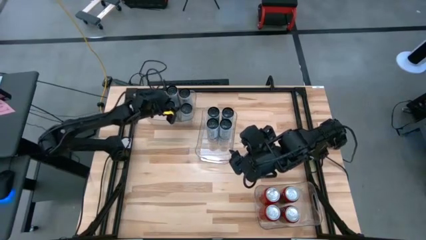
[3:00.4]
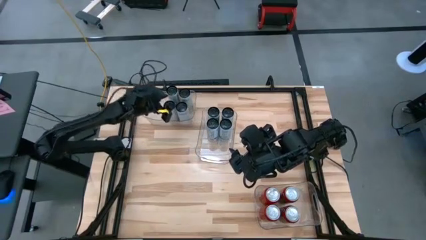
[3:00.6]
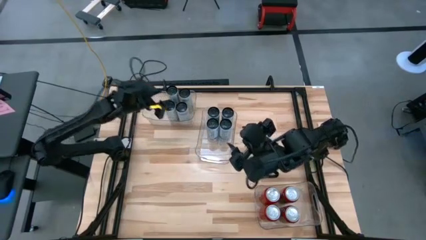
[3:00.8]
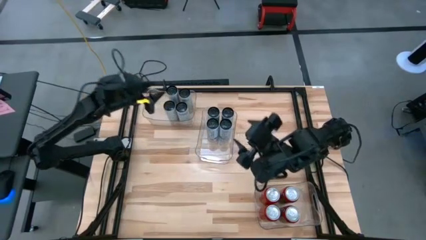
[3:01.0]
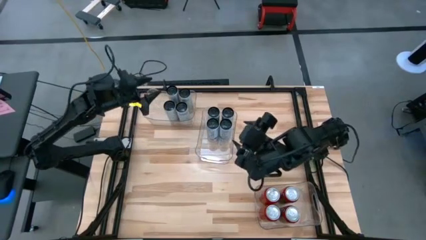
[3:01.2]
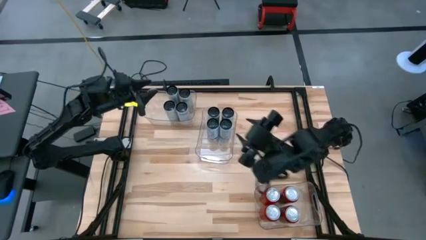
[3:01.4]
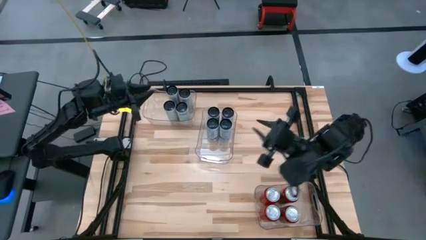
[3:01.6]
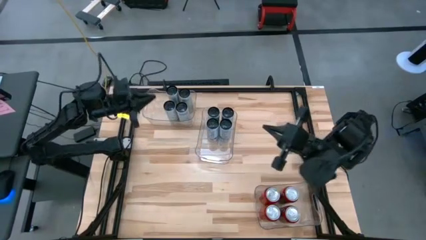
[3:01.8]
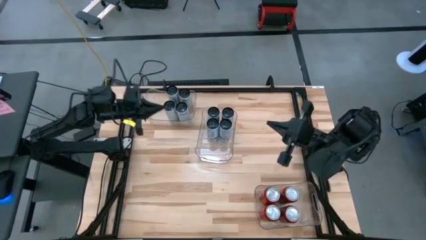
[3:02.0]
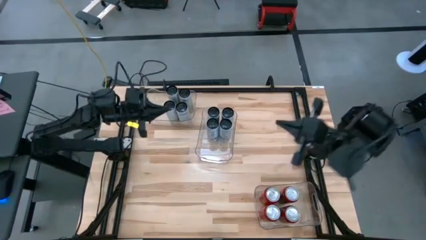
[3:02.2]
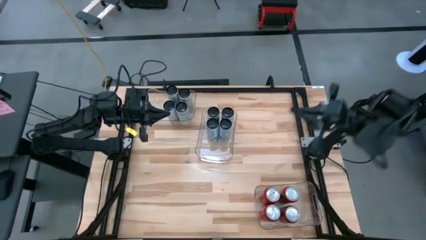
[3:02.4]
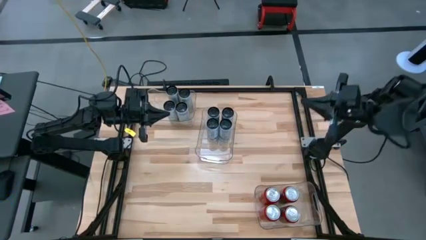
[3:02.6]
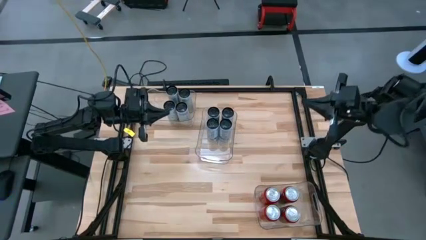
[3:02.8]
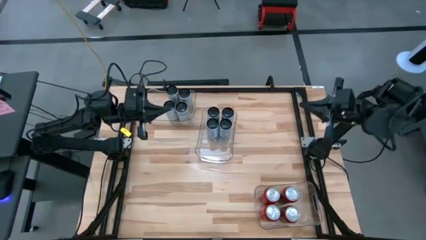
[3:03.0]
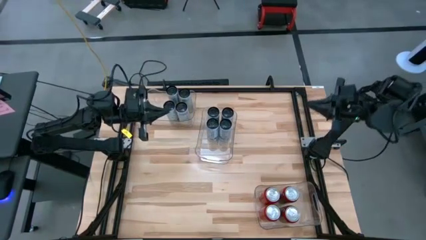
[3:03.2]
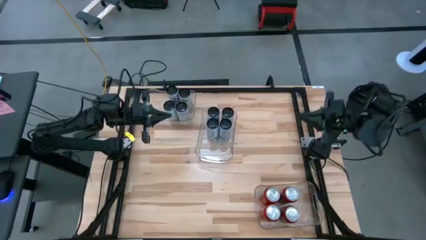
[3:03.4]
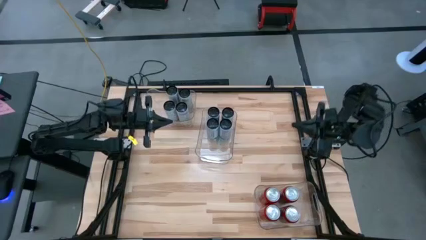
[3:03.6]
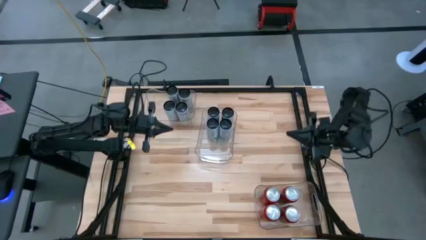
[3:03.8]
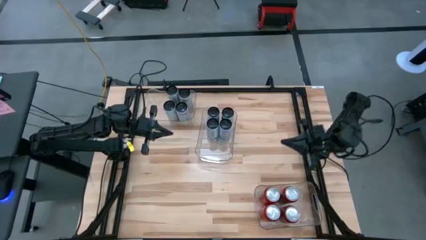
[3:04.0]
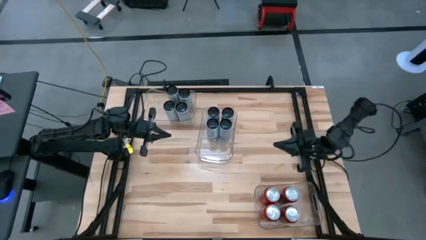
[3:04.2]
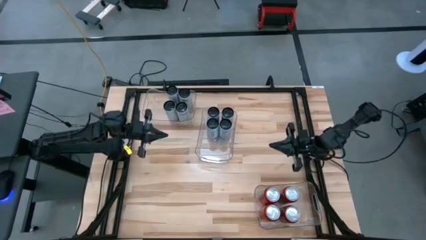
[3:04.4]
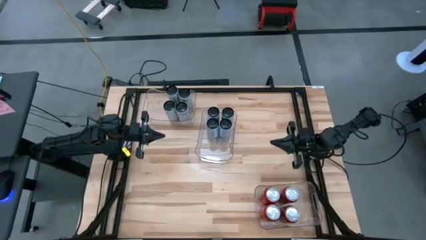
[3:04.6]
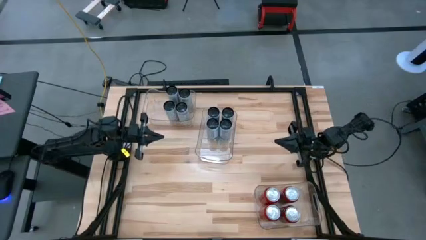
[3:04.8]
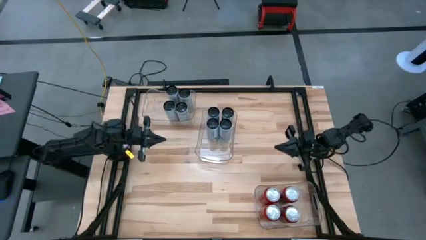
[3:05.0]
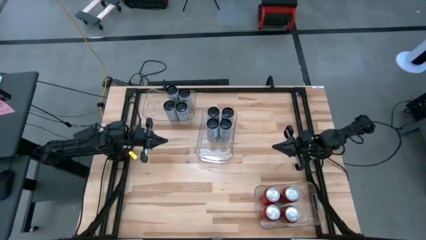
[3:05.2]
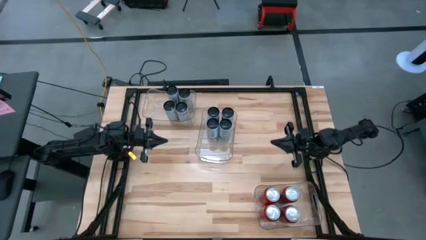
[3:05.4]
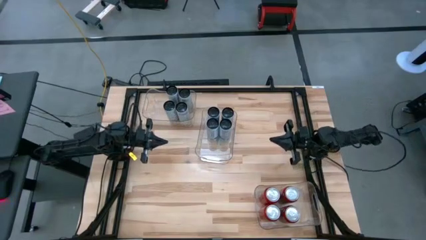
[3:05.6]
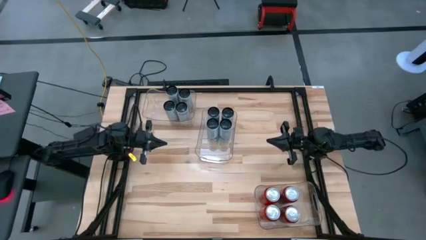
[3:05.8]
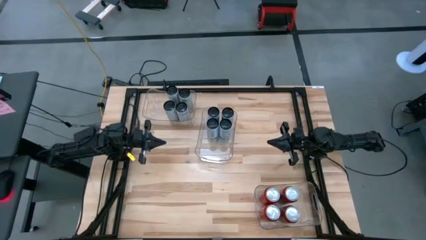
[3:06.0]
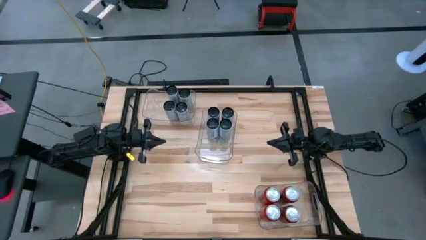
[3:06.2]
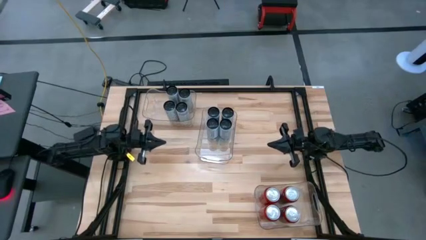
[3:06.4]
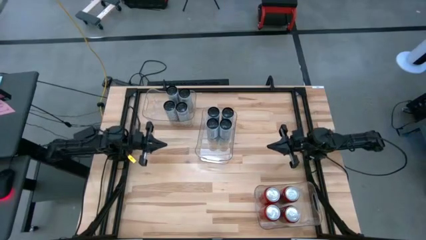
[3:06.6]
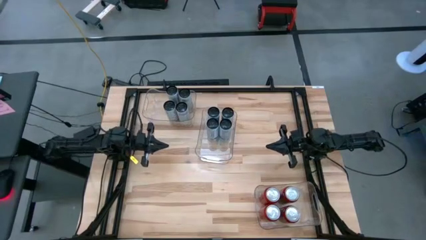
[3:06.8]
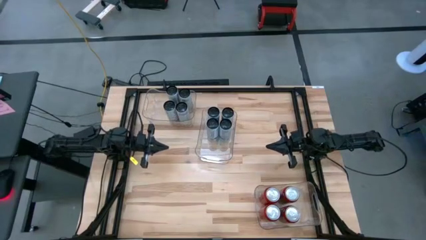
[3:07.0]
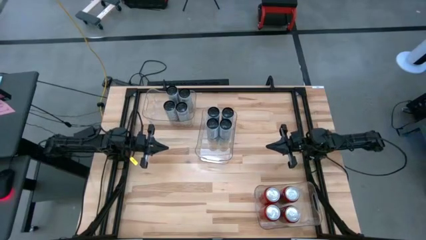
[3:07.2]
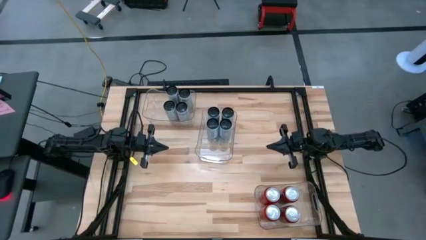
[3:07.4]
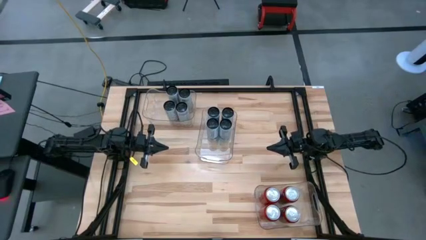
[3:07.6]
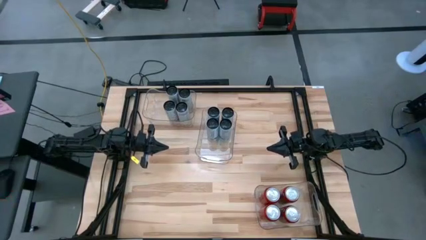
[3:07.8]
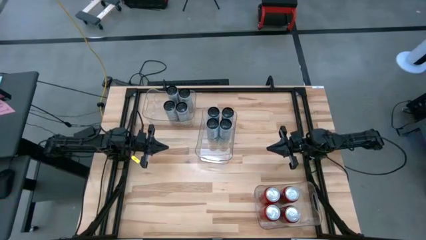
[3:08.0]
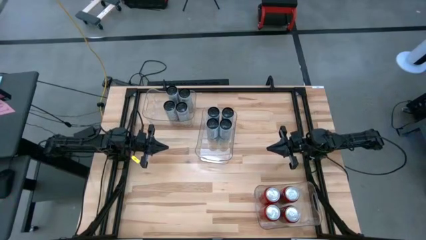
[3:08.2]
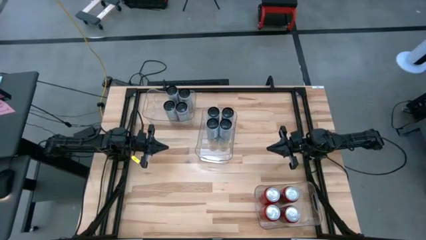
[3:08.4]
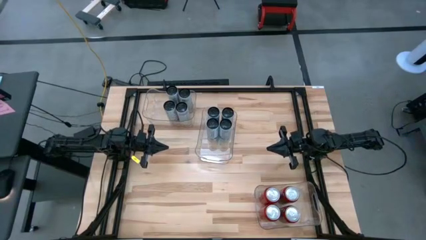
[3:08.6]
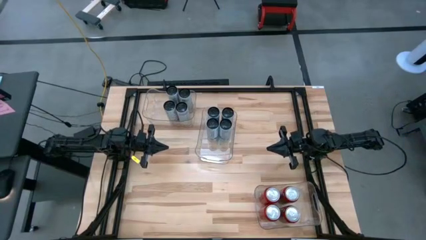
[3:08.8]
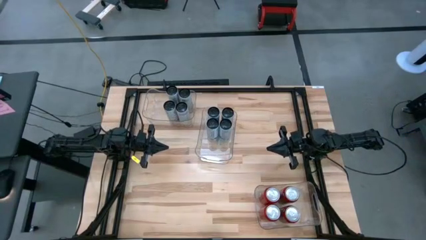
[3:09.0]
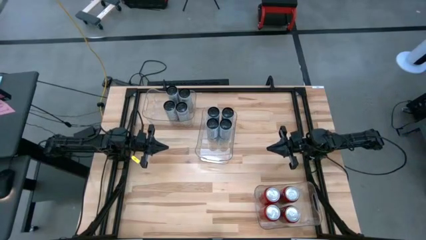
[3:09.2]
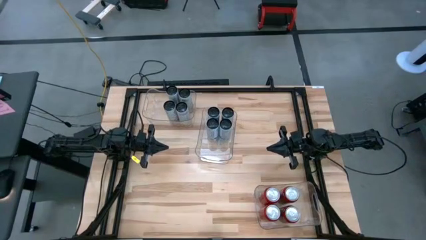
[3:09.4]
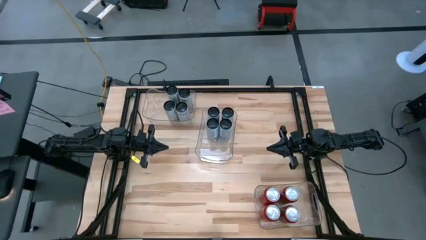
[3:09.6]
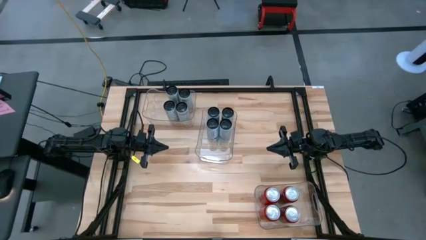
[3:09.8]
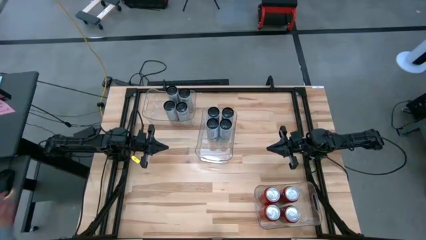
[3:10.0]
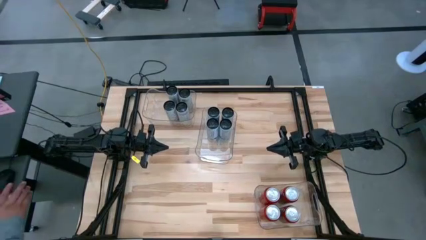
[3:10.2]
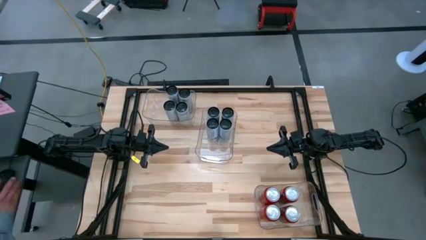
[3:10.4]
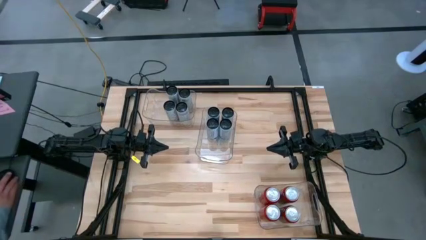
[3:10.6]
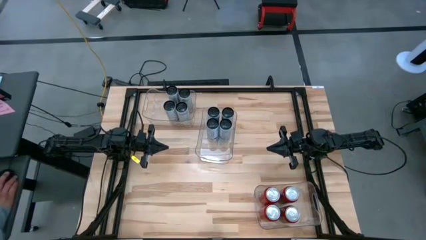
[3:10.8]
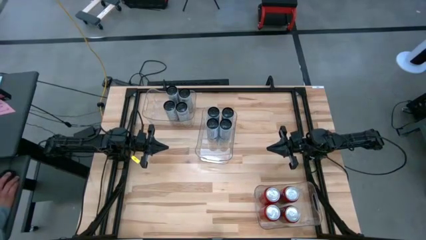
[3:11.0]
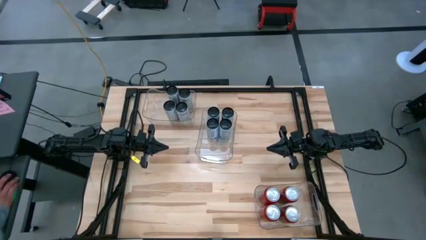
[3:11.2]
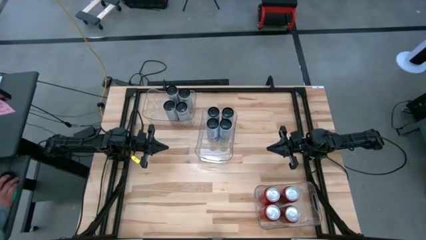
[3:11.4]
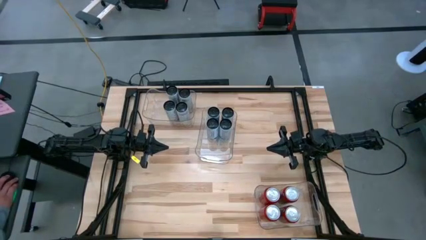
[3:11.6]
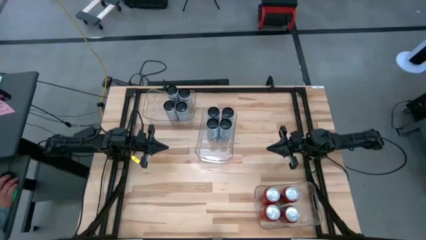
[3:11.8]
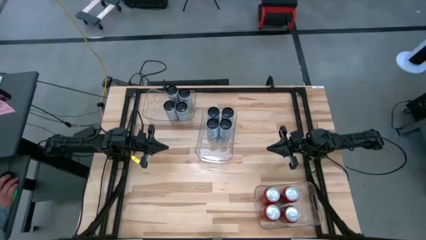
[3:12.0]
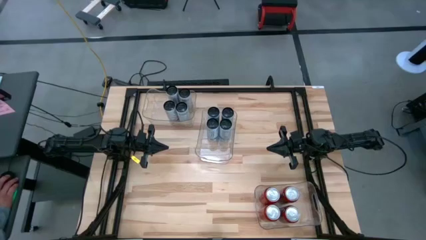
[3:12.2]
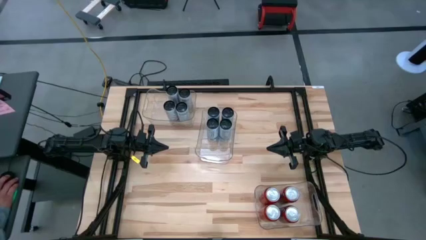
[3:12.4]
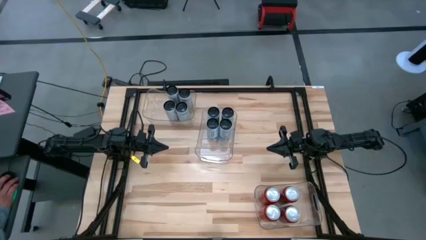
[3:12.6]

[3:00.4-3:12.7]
Task: Sort soda cans
Return to Home Position
